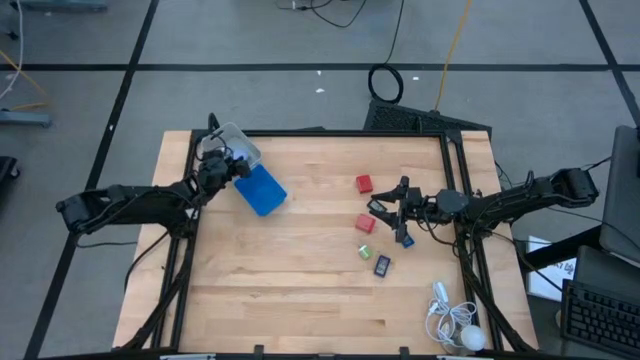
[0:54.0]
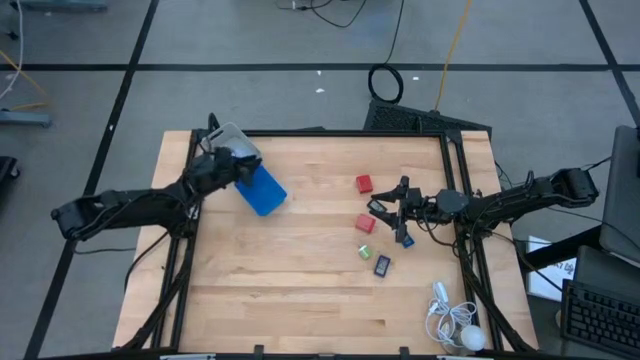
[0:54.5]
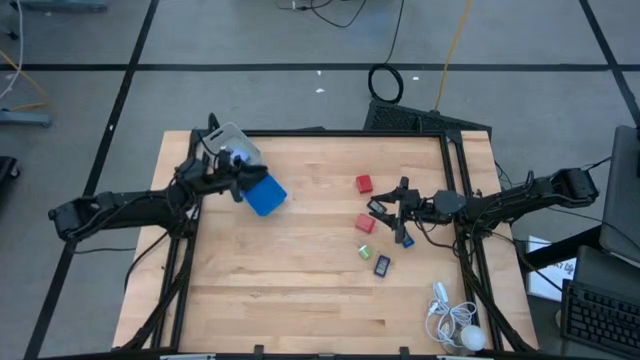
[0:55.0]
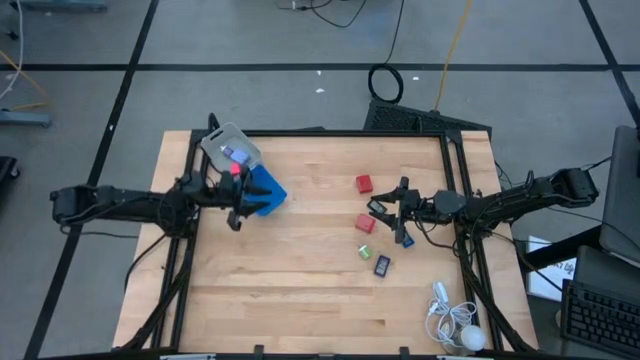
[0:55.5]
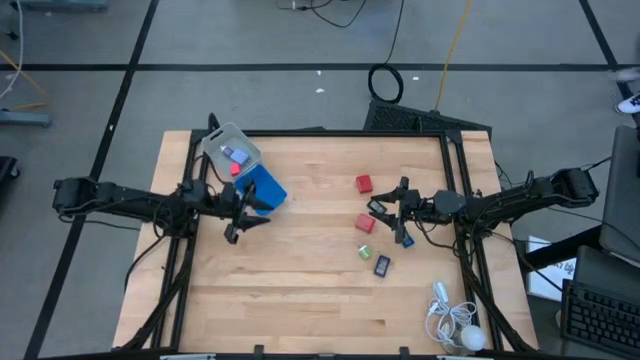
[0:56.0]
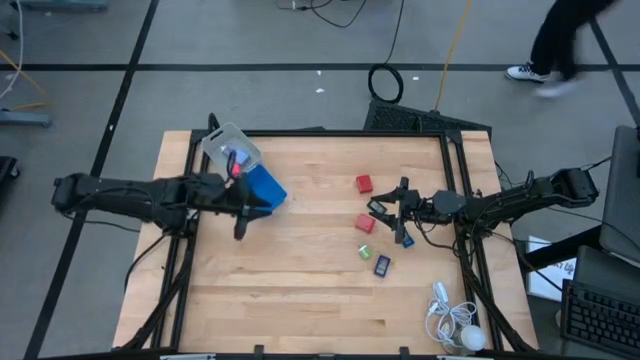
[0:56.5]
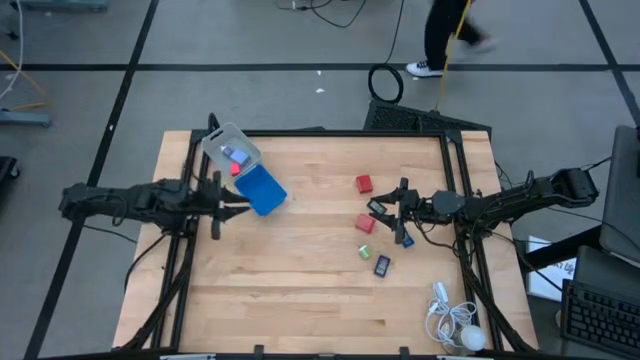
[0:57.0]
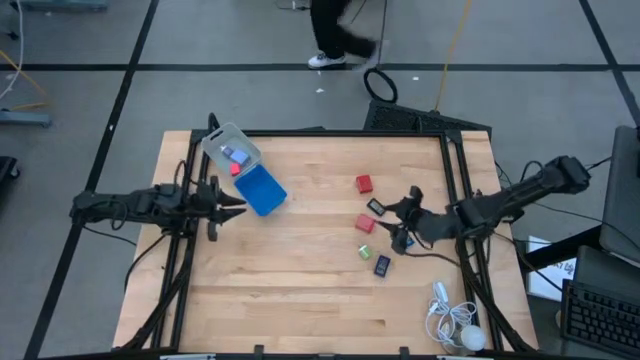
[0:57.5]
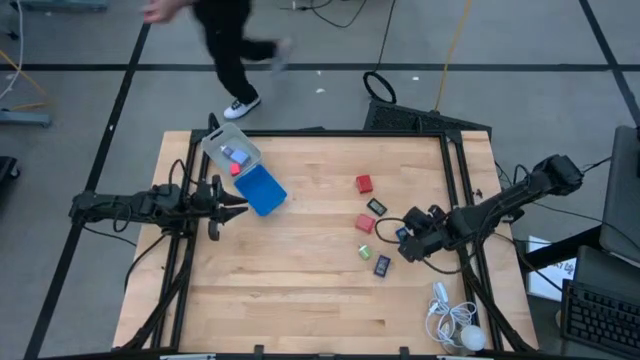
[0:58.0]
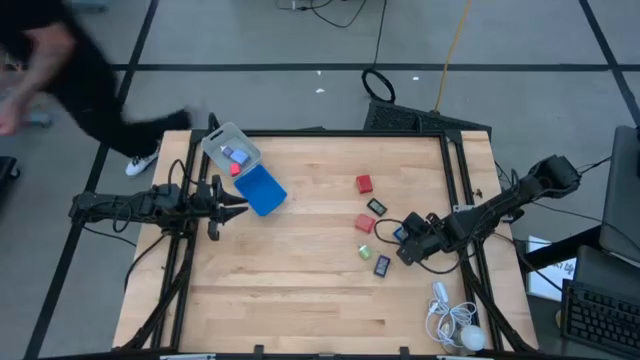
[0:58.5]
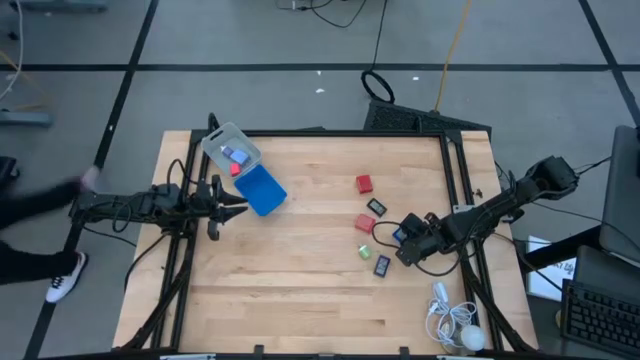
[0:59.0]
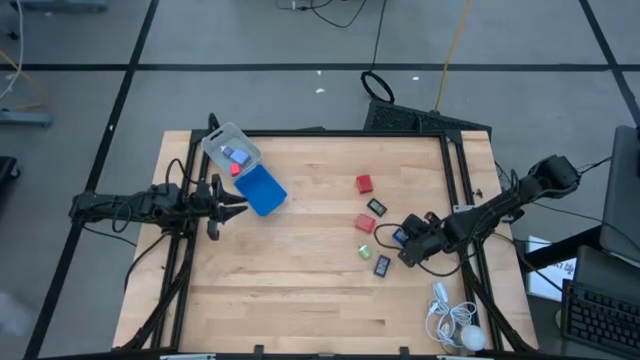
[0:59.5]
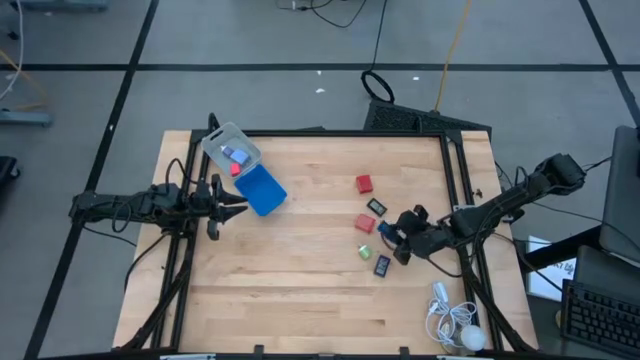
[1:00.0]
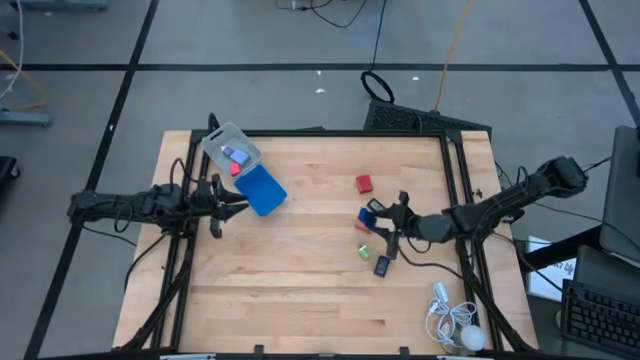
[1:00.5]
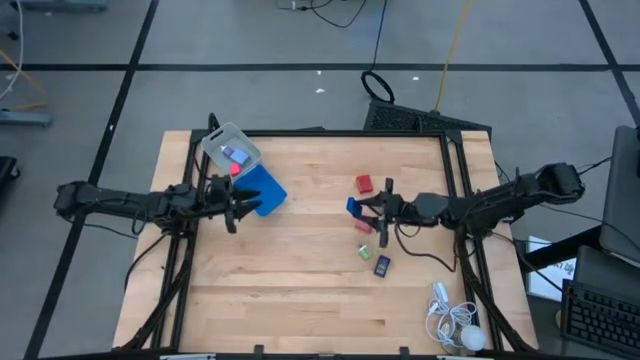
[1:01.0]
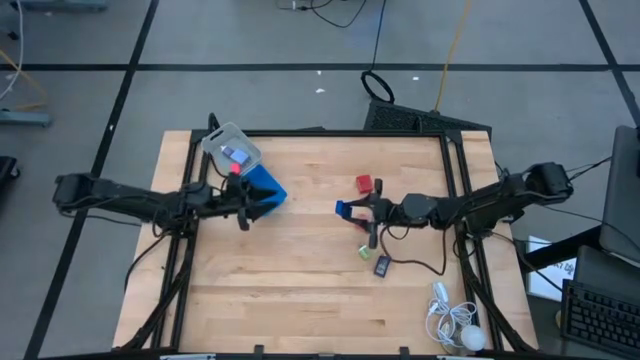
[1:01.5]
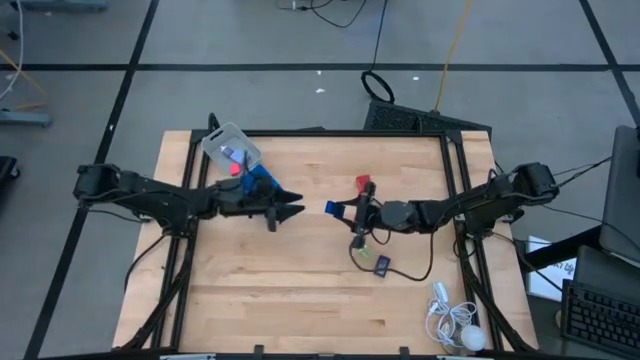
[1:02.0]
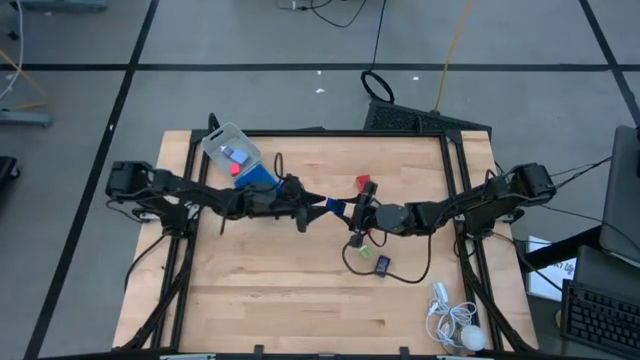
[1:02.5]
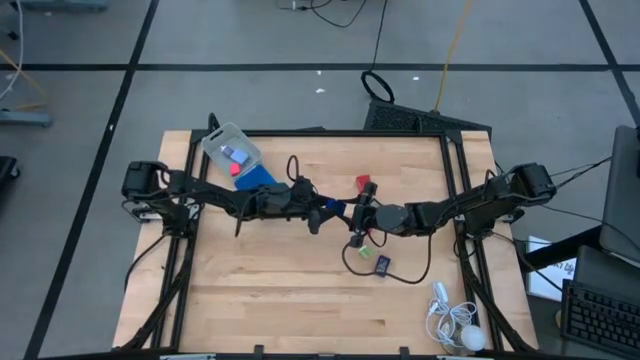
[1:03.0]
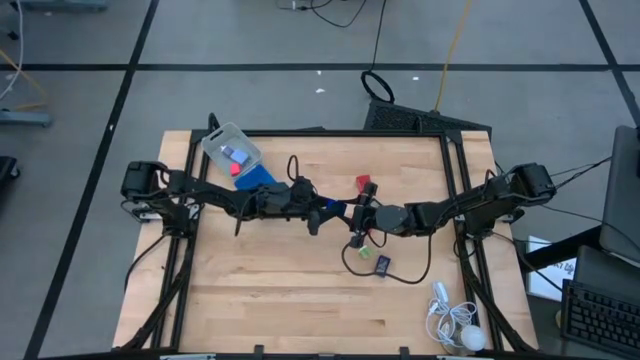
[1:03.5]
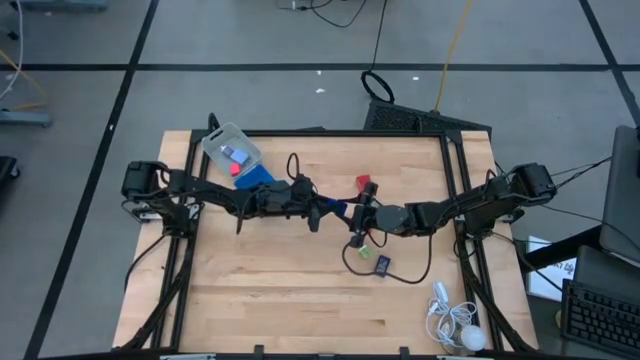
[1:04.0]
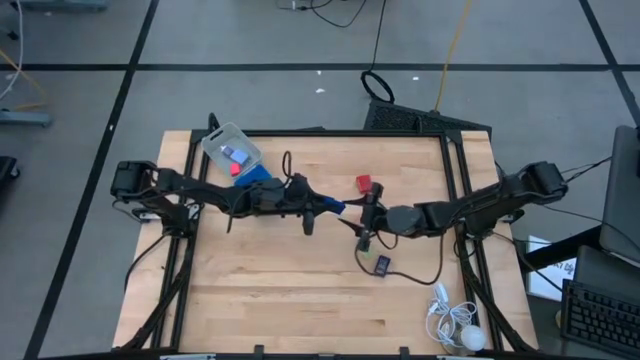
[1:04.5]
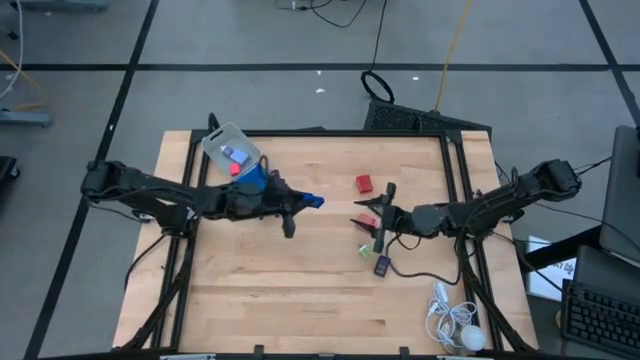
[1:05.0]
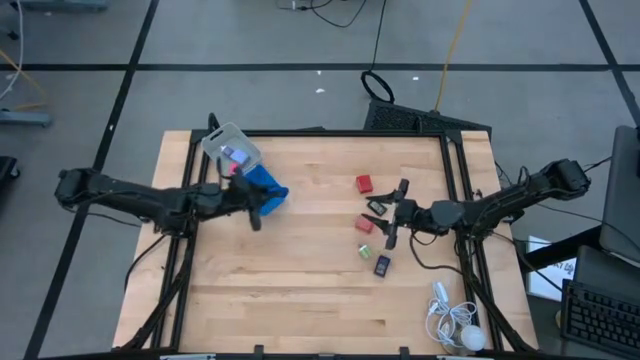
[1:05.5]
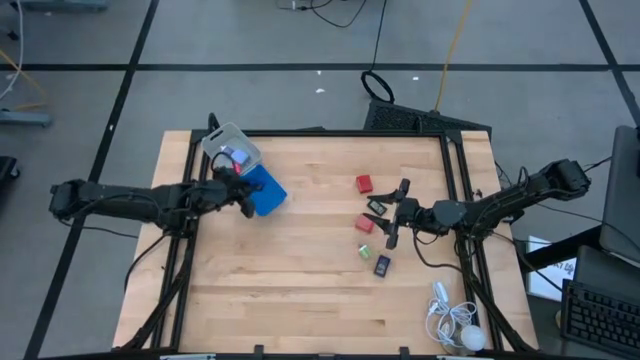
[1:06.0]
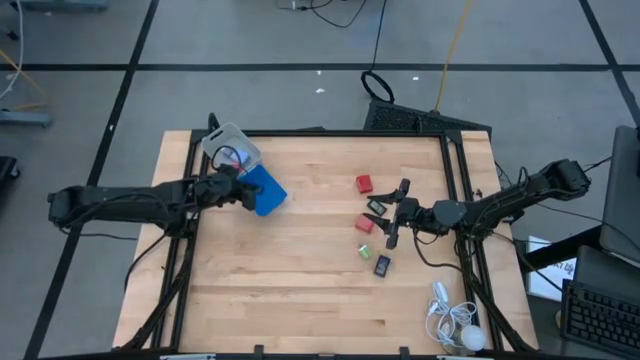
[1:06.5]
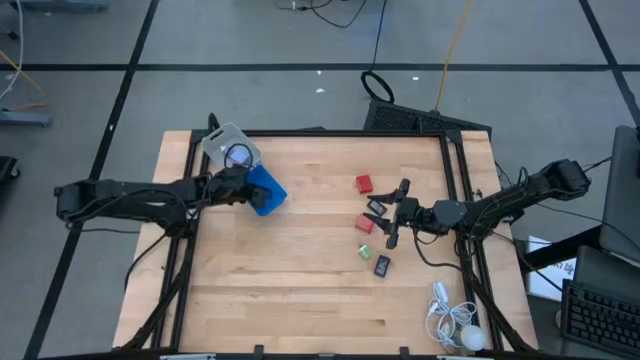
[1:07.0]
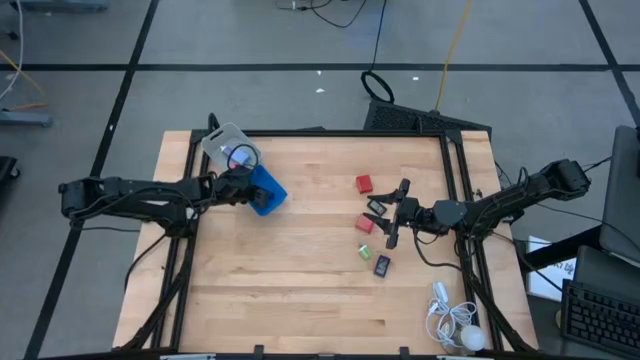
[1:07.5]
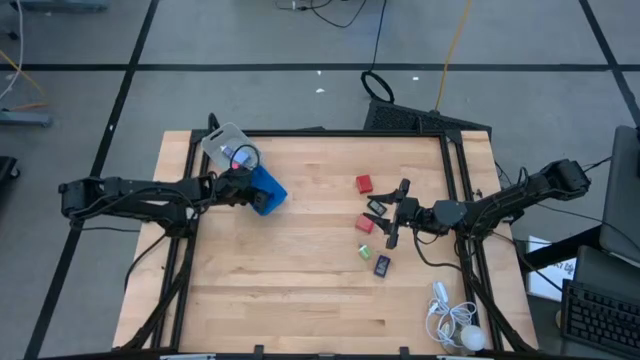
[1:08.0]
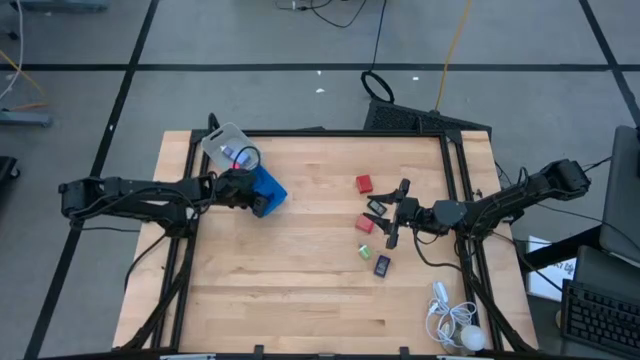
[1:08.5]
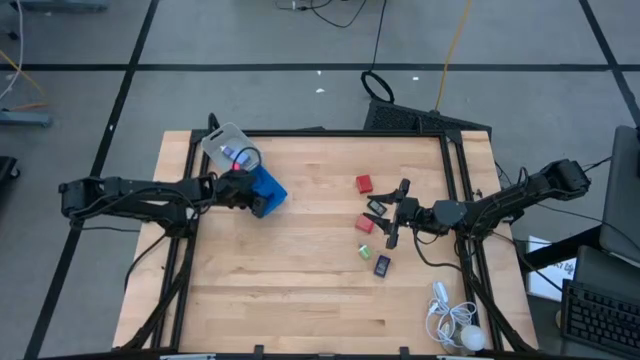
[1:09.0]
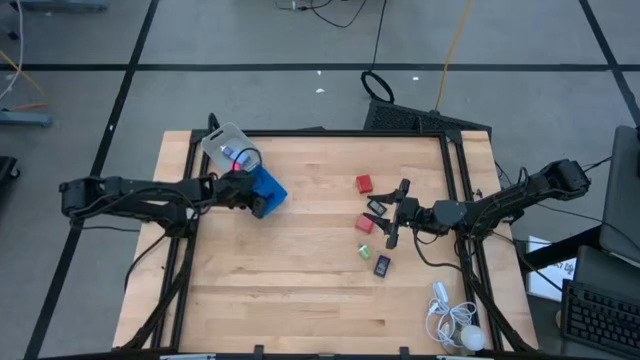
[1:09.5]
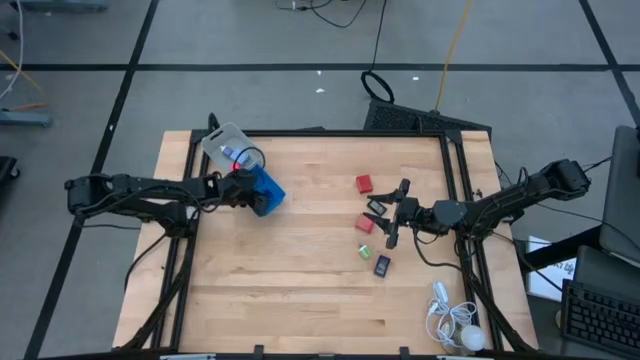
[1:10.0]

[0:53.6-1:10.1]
Task: Pick & Place Office items
Put the blue digital timer into the blue bin
